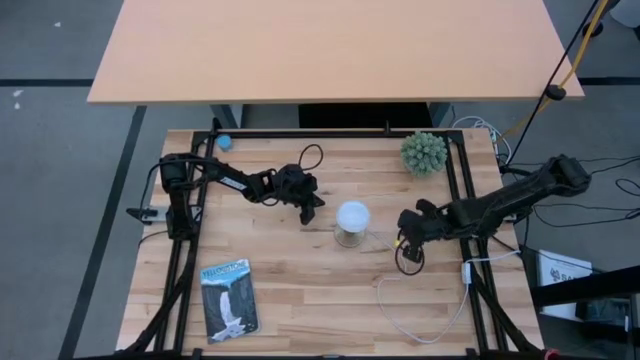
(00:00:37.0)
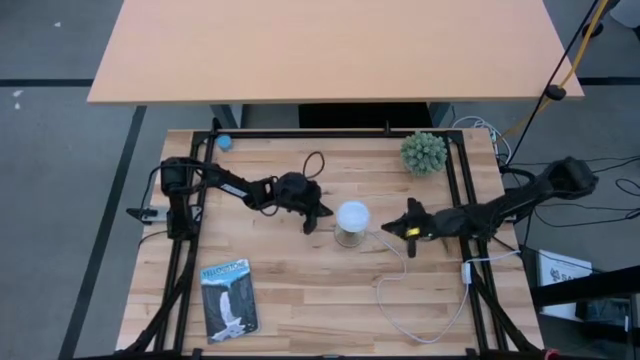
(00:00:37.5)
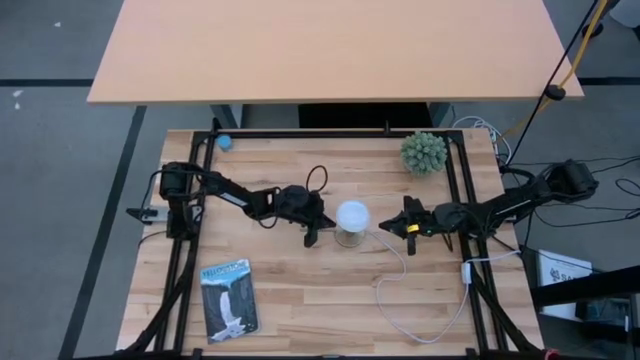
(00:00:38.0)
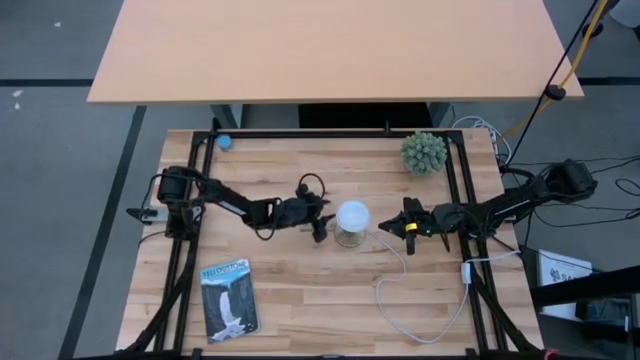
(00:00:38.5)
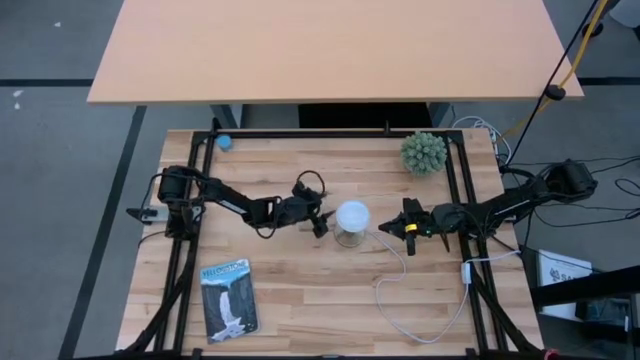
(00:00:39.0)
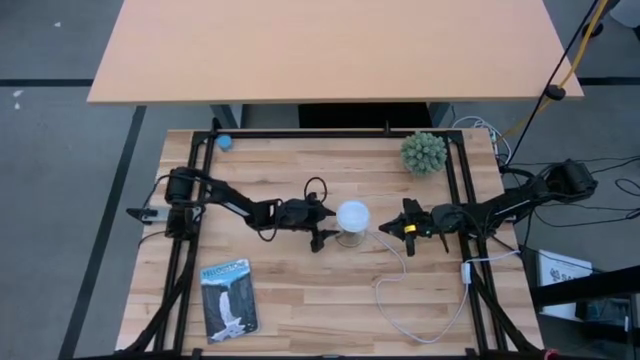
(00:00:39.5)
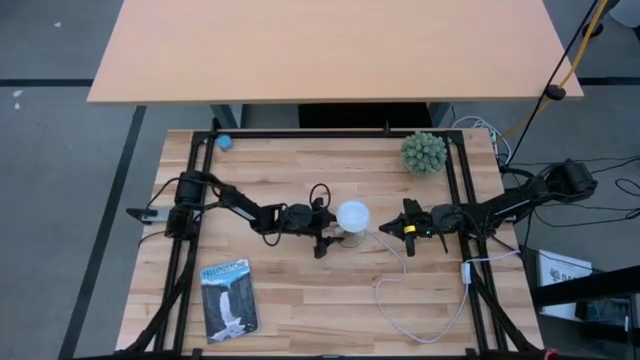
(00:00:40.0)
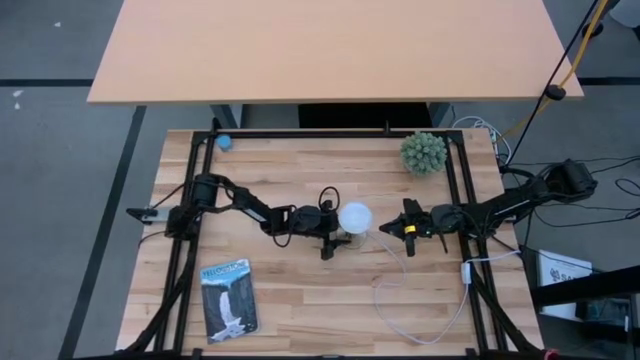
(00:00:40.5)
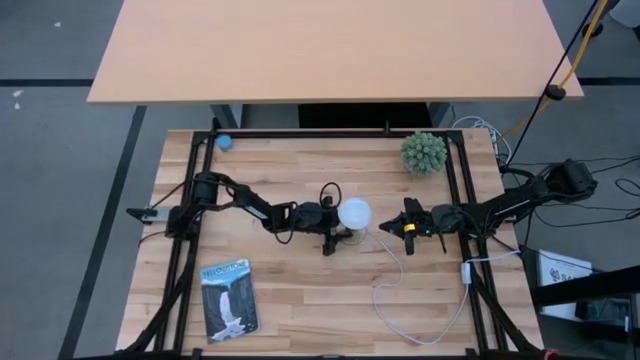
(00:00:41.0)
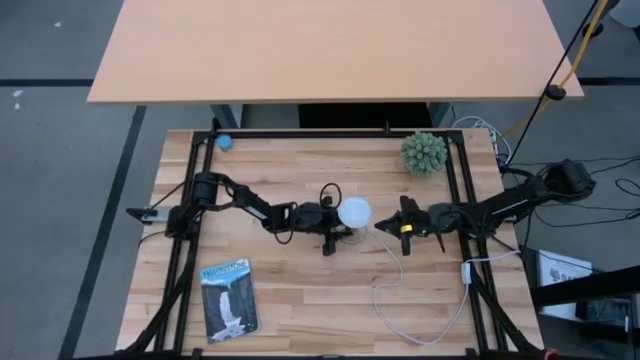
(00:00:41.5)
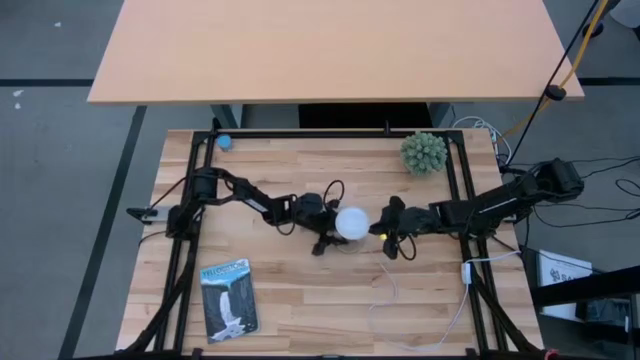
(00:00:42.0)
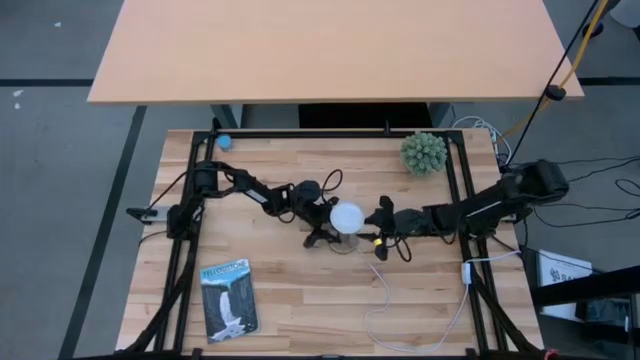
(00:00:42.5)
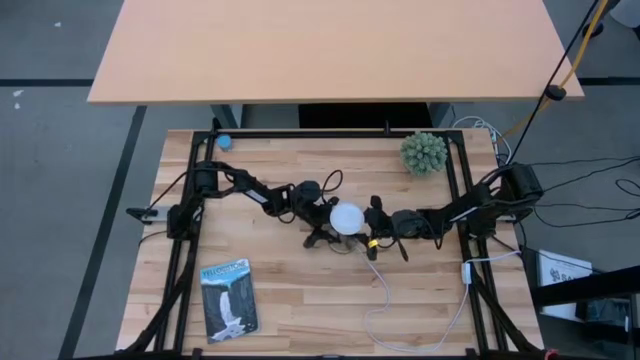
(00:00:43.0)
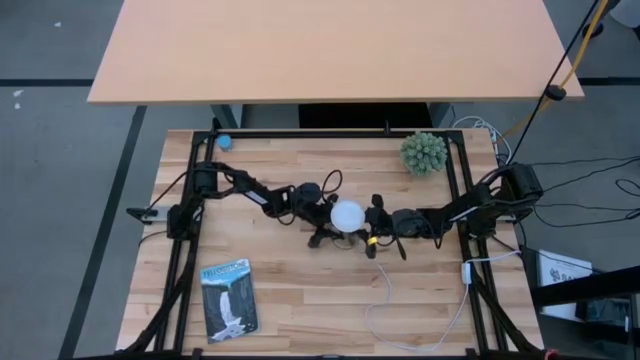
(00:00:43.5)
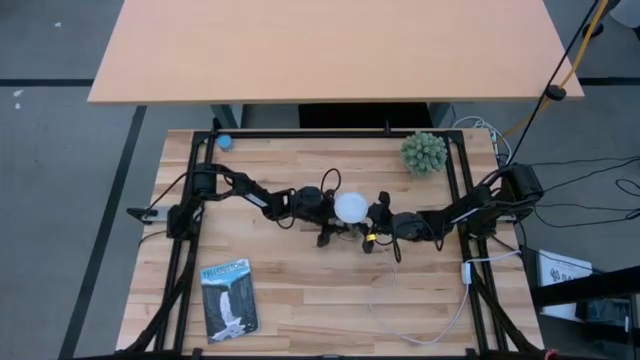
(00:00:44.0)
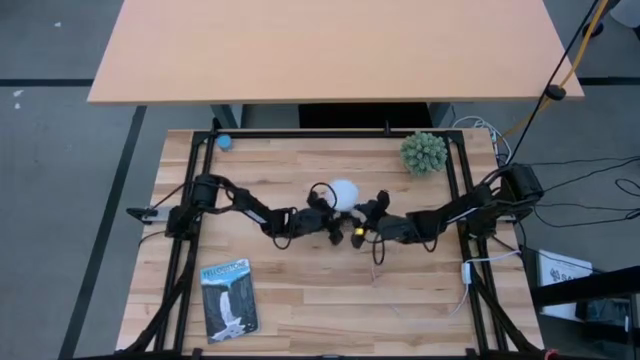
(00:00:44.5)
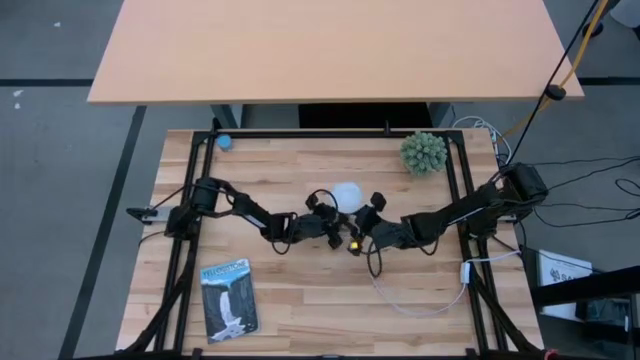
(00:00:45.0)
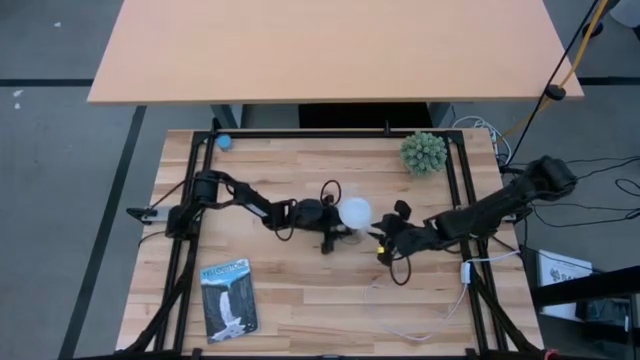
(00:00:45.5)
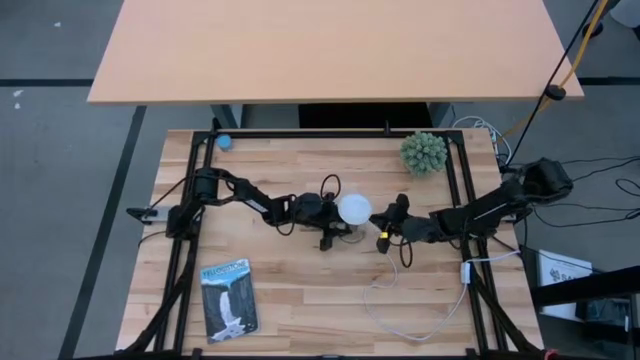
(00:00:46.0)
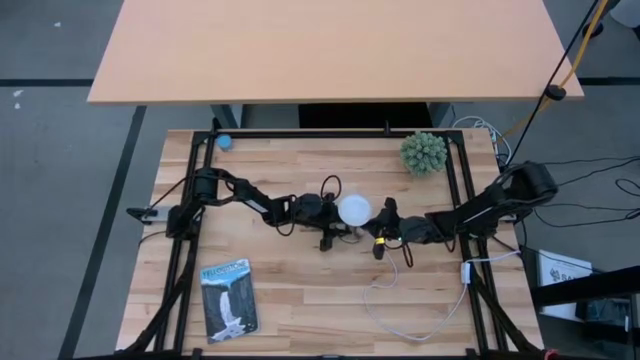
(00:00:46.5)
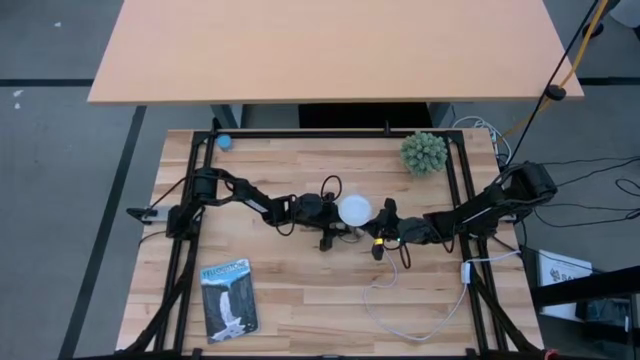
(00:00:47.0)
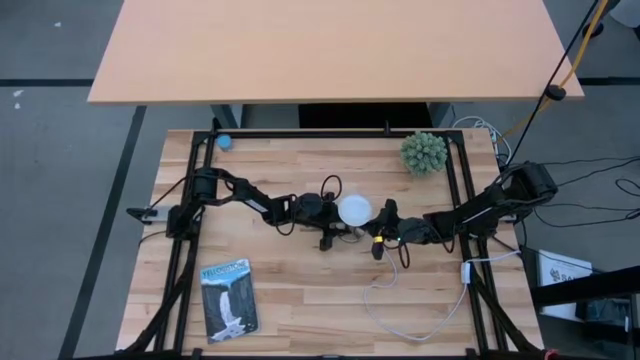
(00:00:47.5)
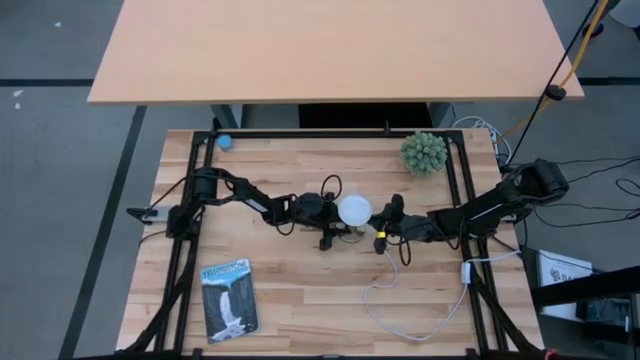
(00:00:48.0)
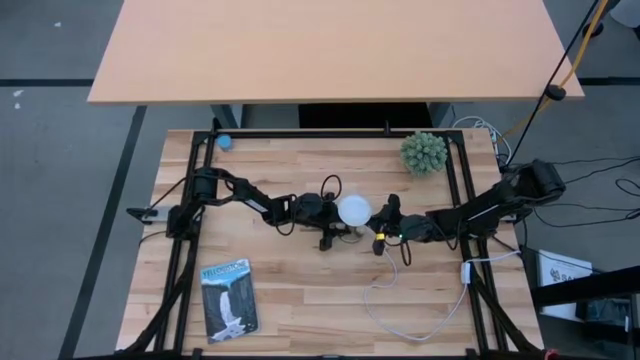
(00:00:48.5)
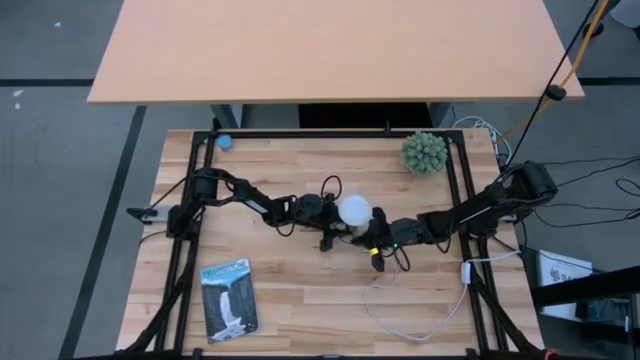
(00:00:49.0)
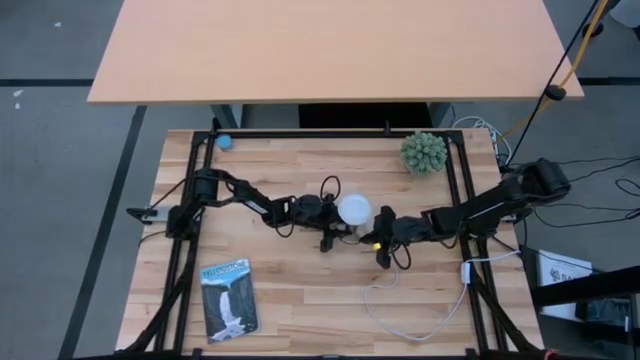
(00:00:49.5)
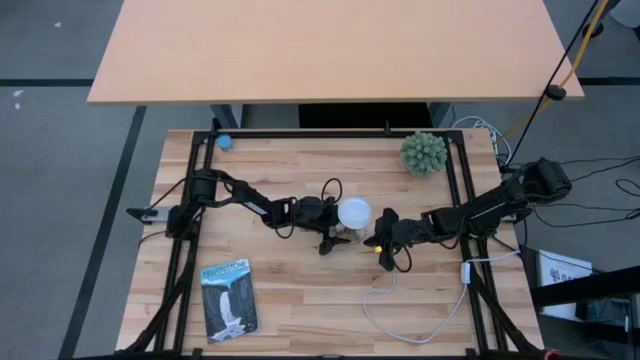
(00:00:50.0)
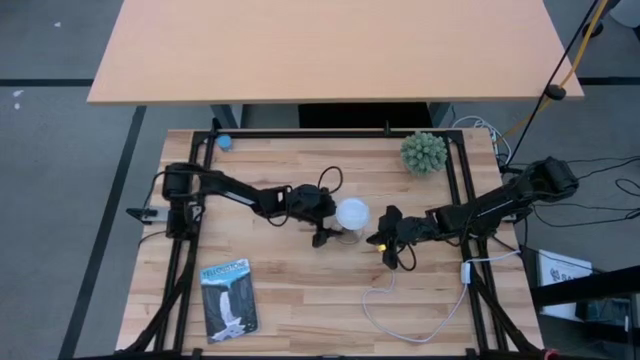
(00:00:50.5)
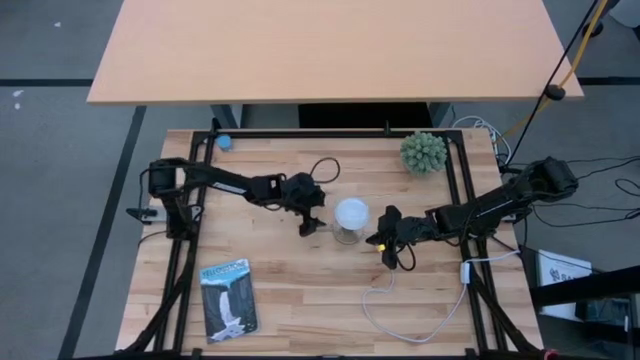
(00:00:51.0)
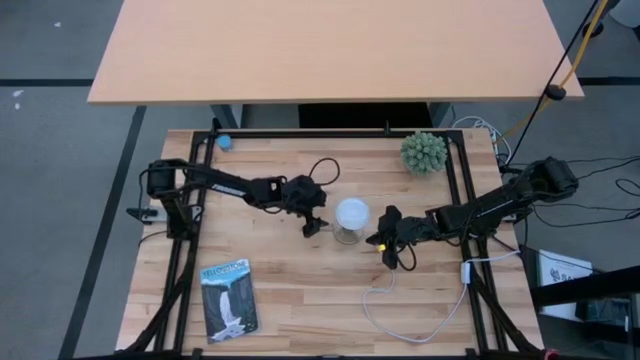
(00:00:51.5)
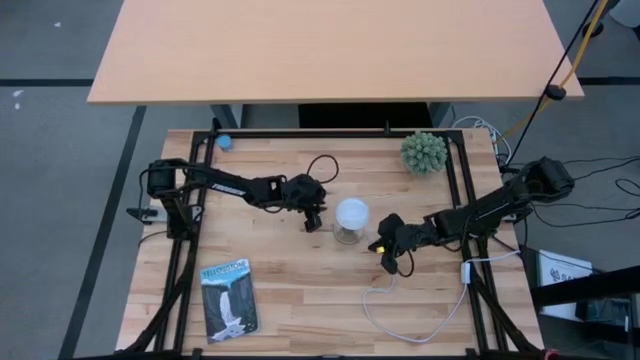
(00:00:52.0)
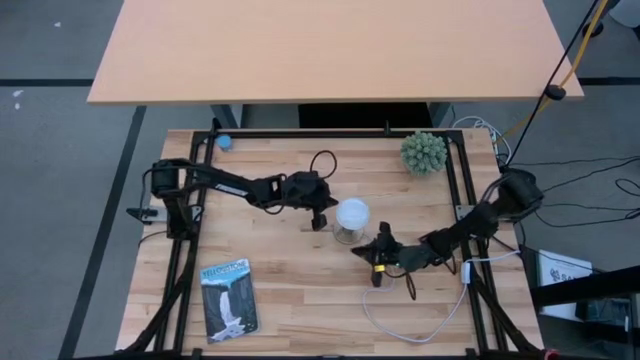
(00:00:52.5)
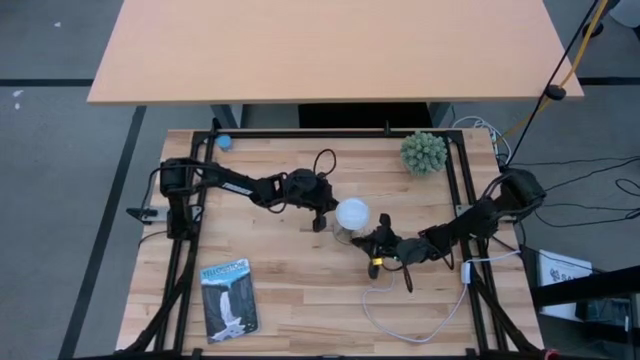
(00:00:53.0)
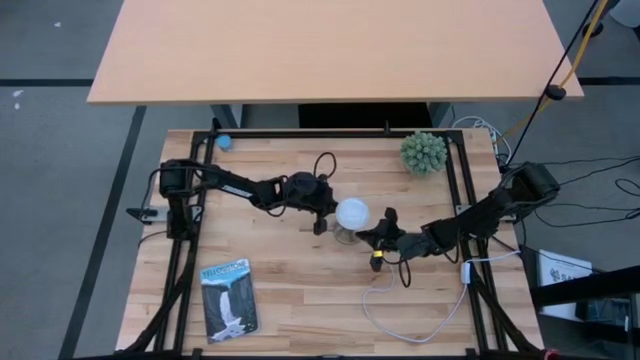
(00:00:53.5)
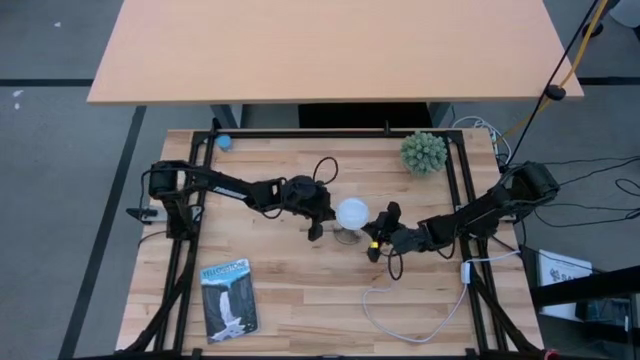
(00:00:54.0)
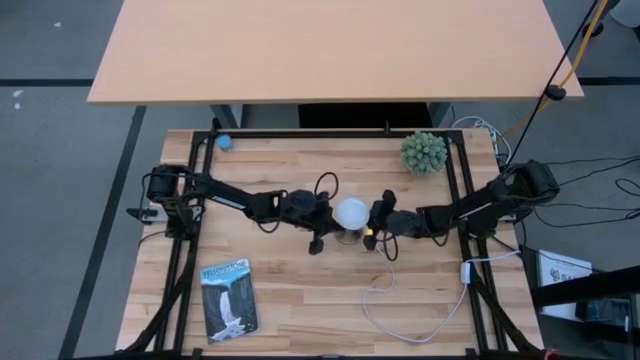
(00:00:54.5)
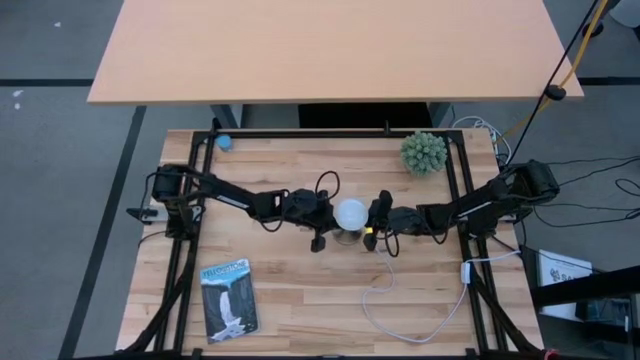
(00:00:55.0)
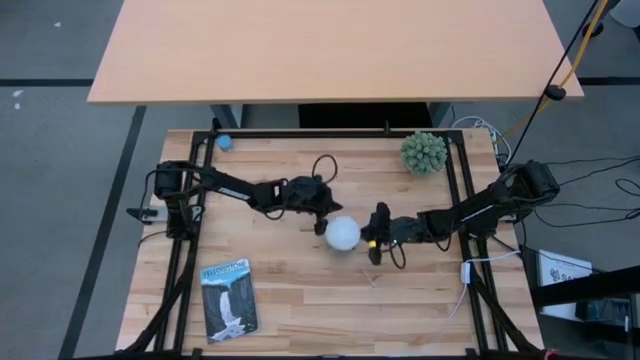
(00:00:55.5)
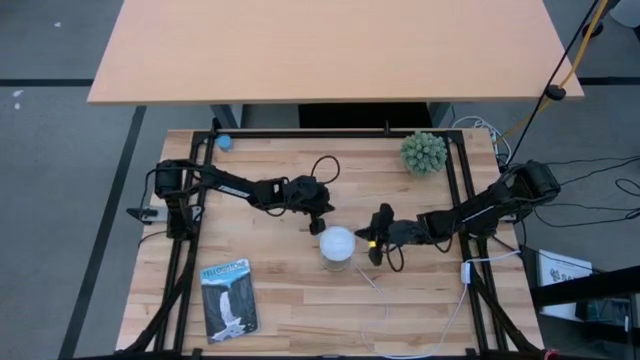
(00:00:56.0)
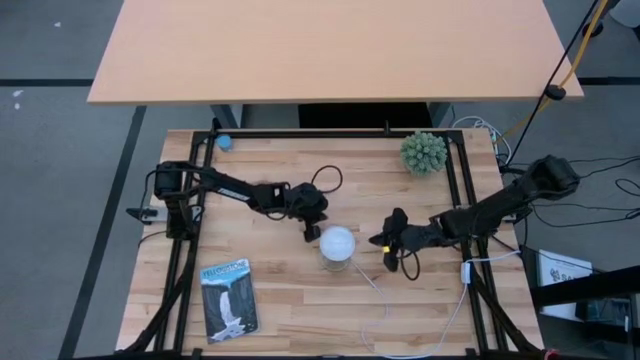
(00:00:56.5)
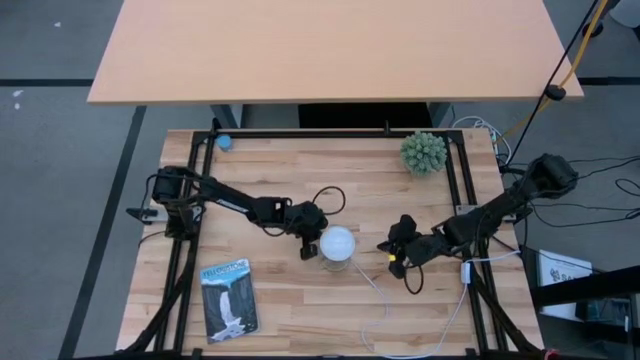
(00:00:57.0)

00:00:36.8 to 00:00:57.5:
Task: Screw lightbulb
Remove the lightbulb from the lamp
